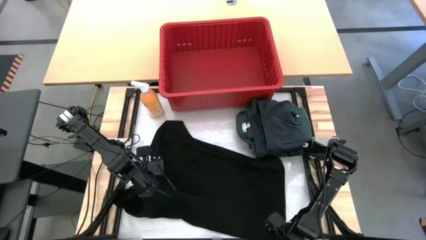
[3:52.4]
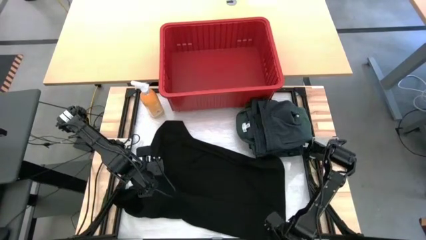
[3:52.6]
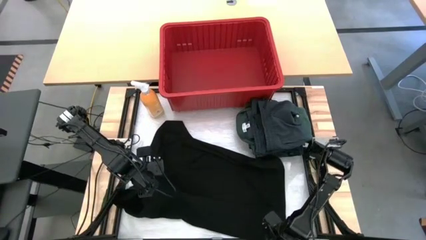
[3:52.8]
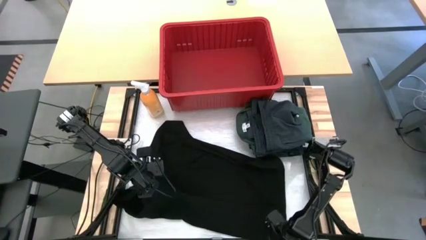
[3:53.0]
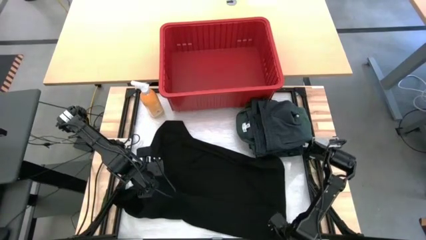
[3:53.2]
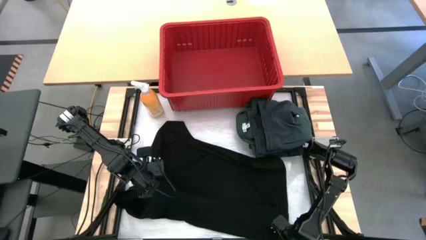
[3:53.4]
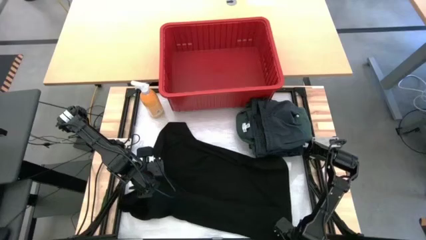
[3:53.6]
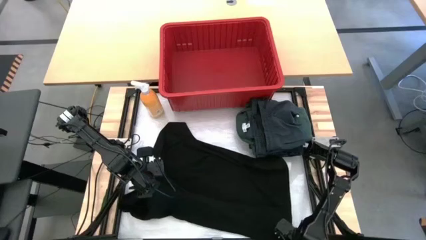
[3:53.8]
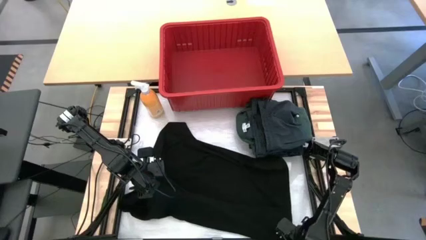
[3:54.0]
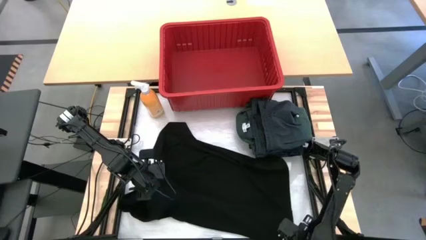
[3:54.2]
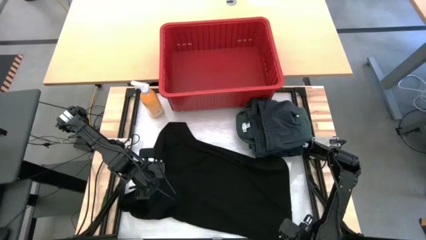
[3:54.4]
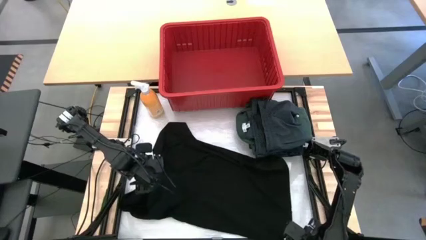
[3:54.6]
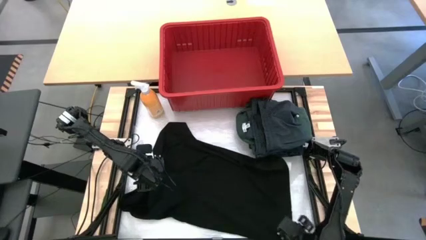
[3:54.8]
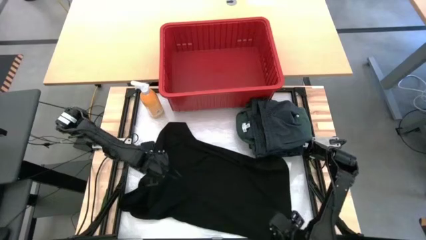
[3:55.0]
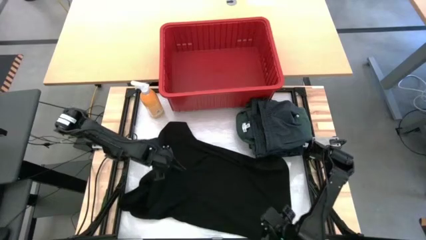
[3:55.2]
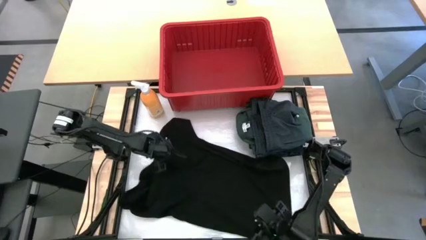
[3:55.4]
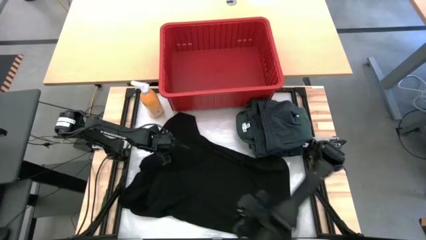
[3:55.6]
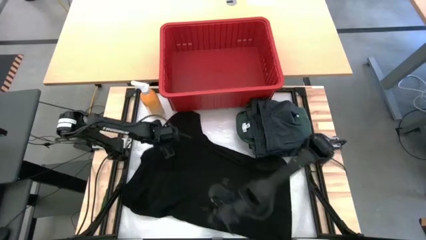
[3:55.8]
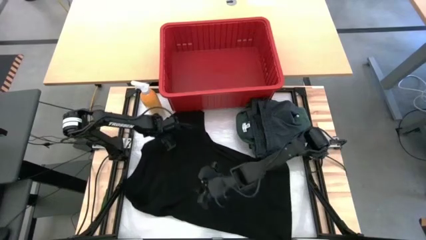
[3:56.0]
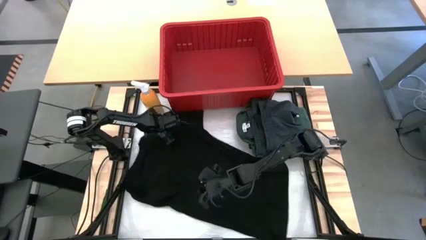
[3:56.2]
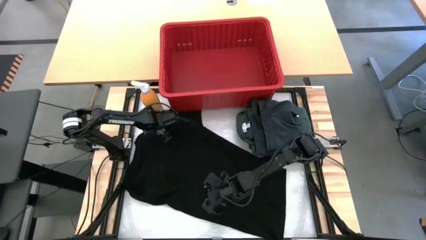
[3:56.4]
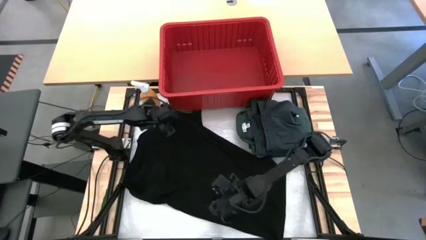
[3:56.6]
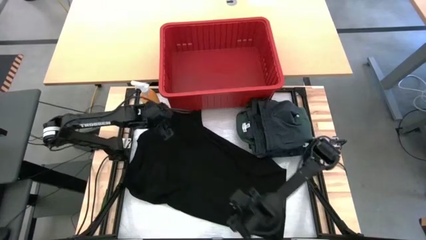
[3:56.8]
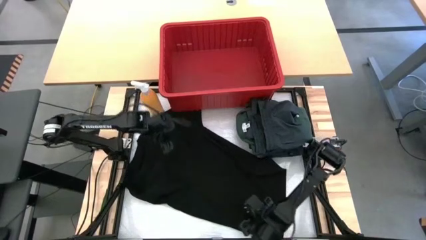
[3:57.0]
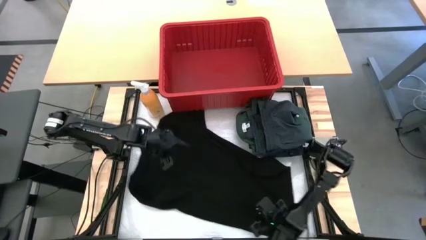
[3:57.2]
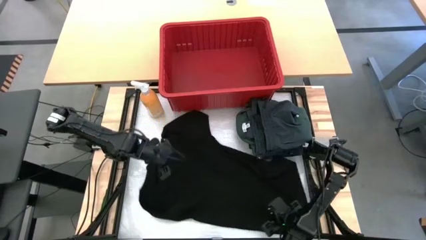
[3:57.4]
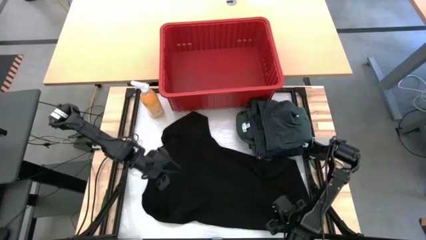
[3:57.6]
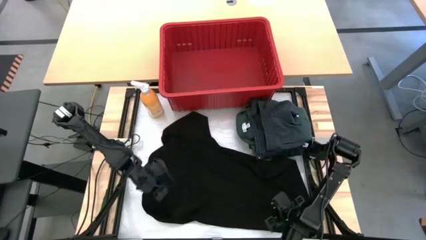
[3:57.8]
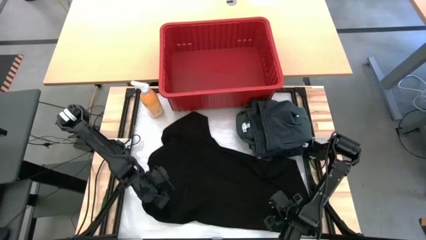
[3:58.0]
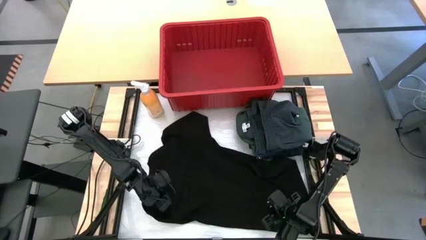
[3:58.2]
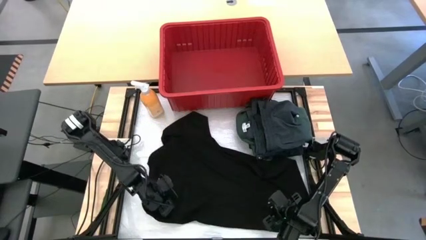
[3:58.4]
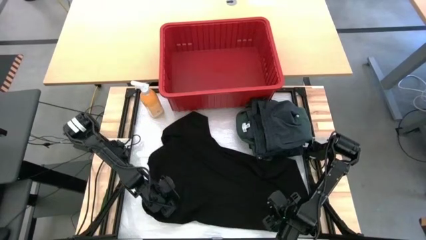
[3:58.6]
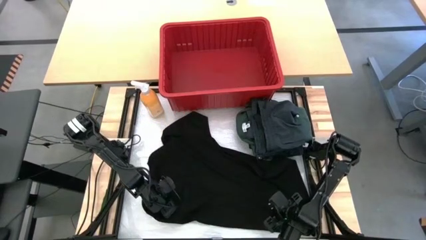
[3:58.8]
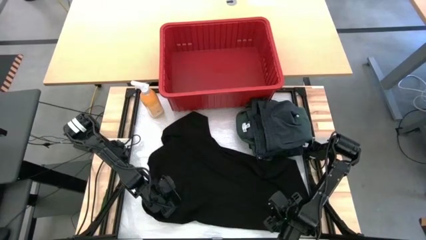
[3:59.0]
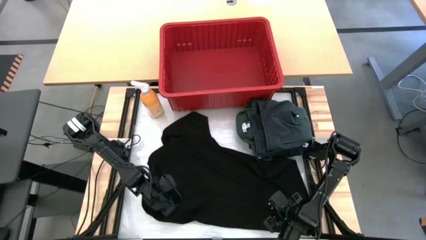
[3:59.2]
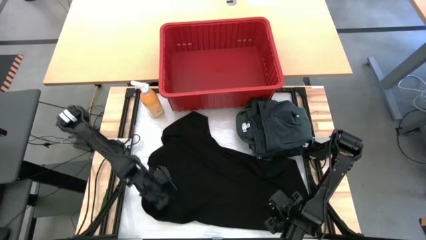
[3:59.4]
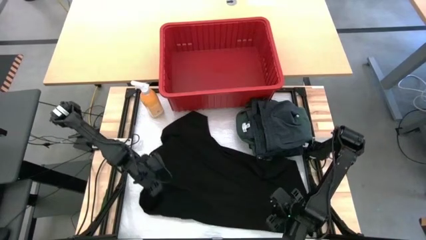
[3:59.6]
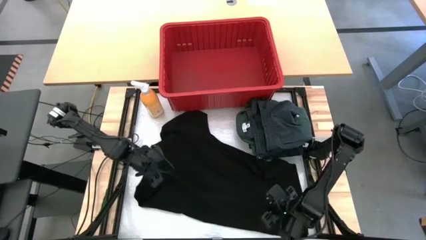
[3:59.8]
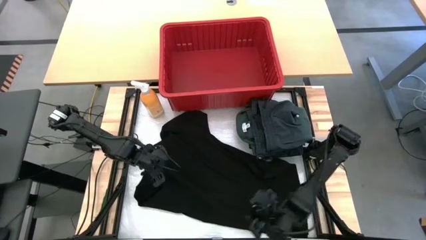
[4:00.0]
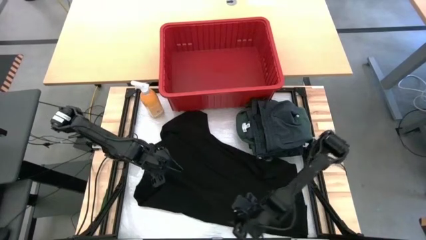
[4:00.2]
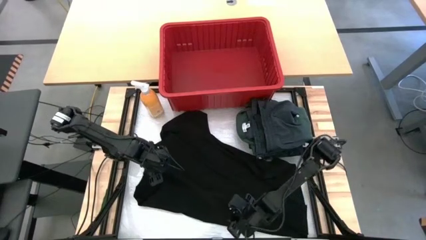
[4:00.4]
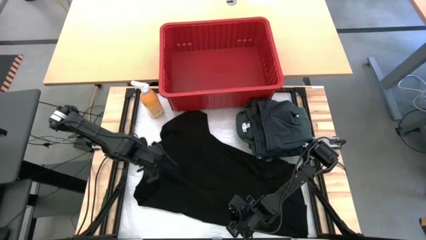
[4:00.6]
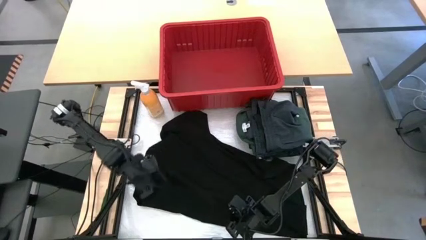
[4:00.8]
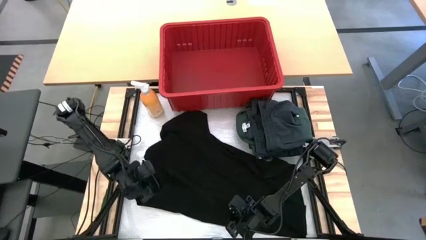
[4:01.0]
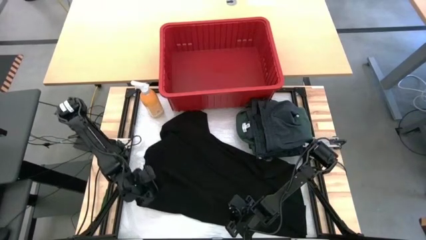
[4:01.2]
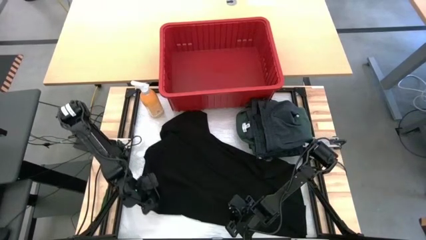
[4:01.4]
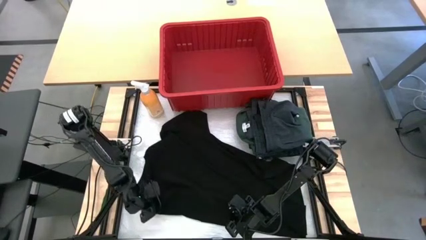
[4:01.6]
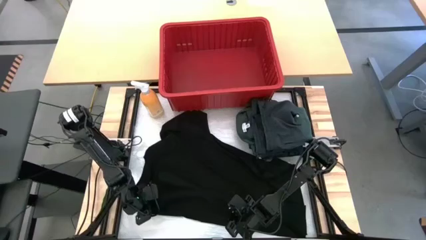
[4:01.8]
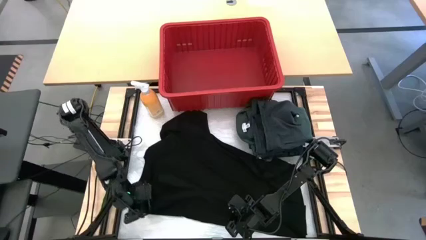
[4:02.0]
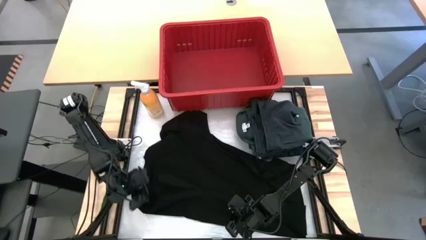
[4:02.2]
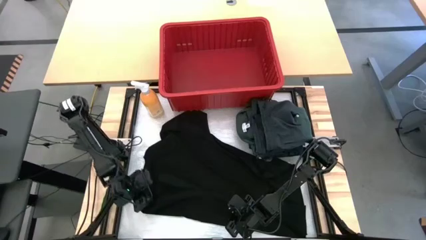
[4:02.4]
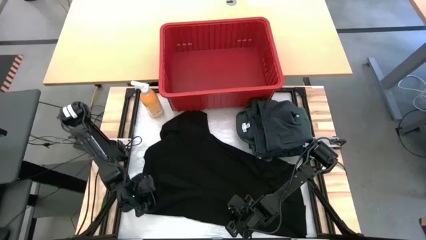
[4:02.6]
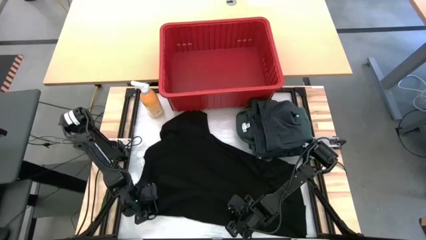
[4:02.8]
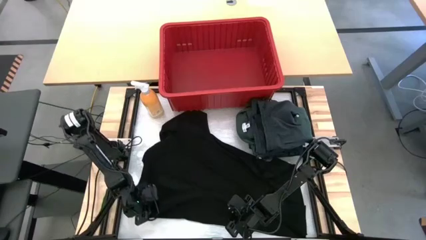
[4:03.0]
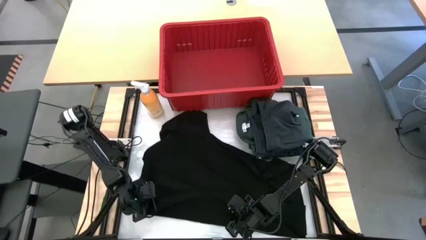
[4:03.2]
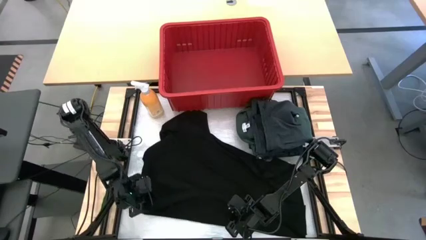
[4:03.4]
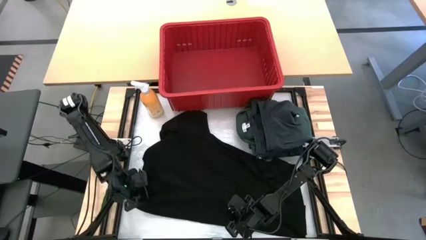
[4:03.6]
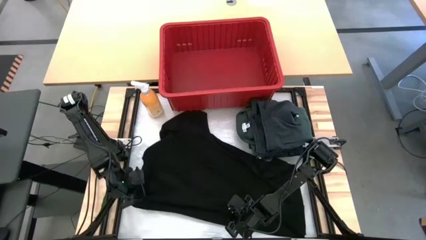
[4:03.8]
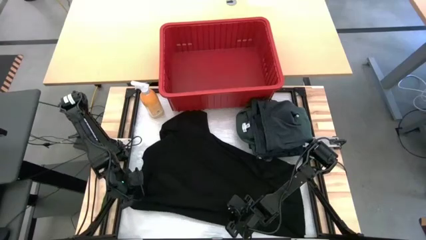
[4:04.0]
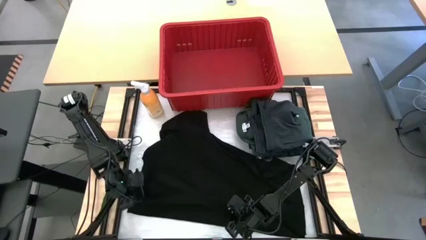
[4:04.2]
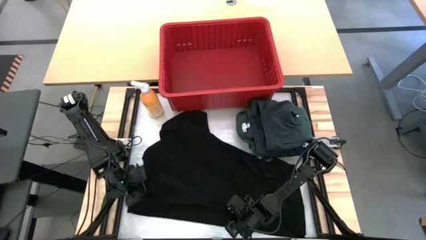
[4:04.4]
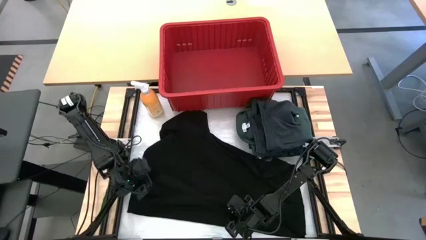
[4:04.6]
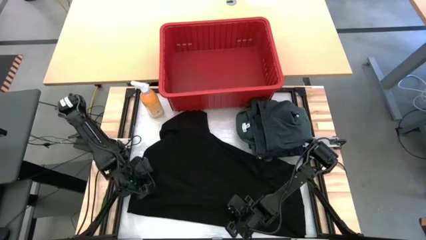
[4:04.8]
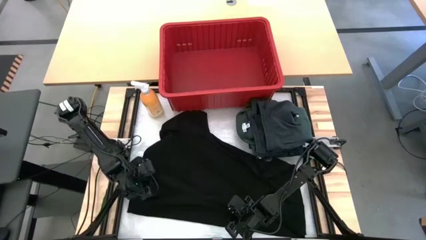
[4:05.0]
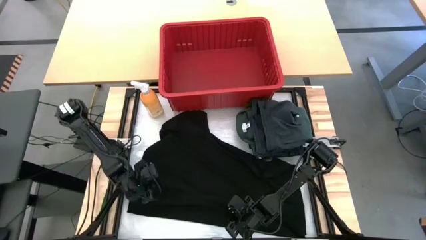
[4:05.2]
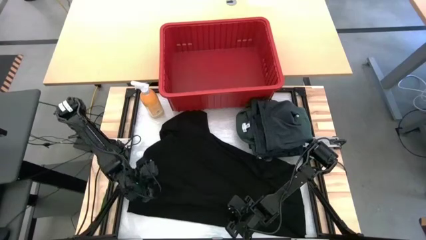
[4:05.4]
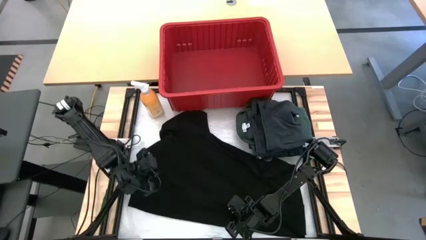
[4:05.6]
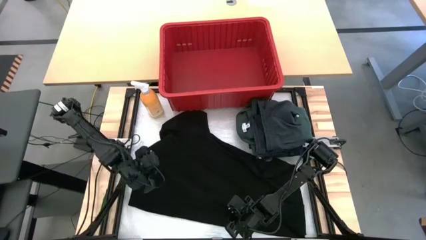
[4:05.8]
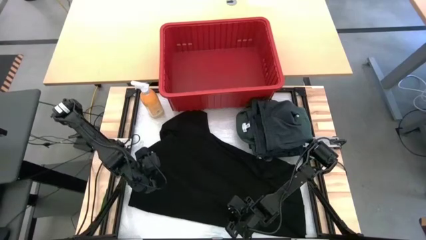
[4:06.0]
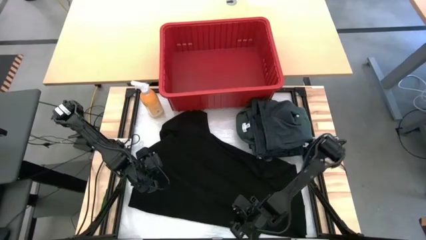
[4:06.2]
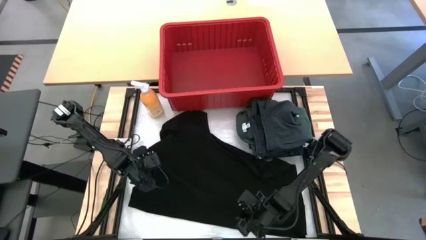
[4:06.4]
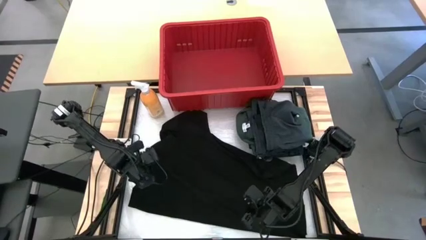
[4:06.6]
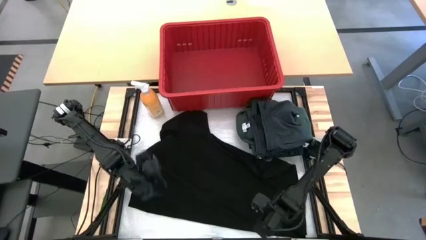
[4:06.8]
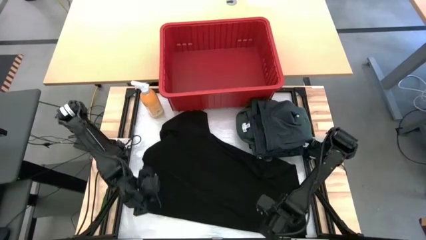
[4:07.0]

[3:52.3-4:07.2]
Task: Fold Laundry from Bin
Fold the black shirt
